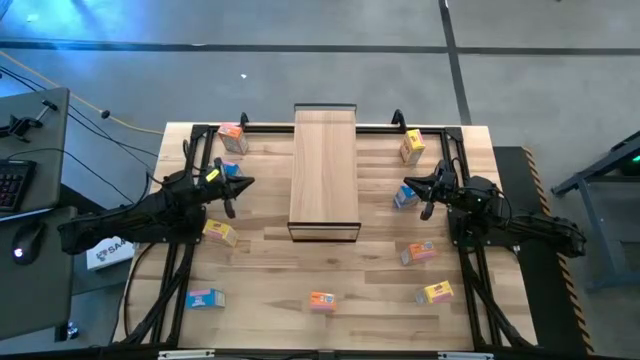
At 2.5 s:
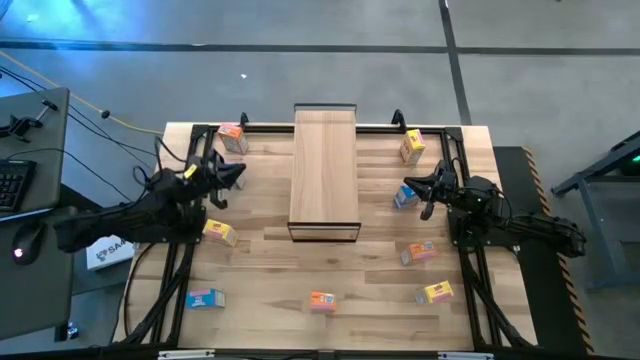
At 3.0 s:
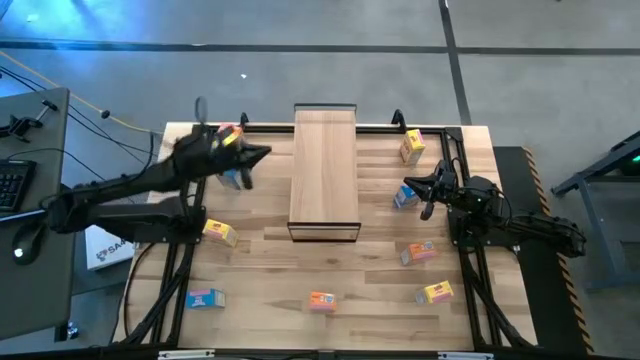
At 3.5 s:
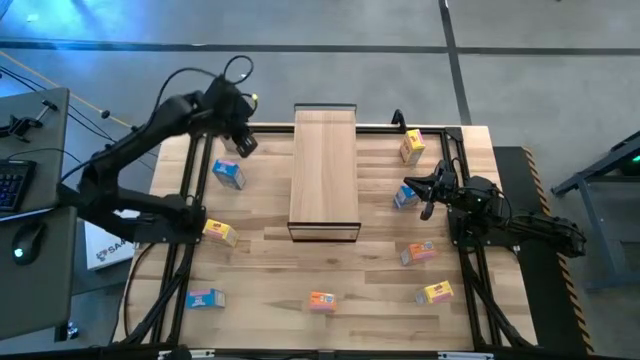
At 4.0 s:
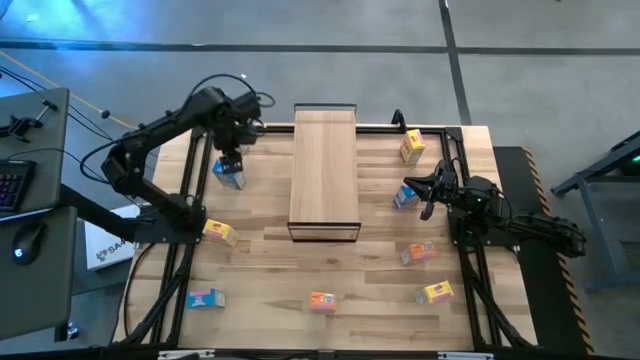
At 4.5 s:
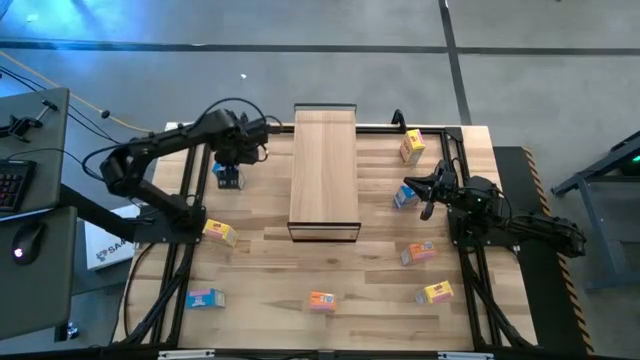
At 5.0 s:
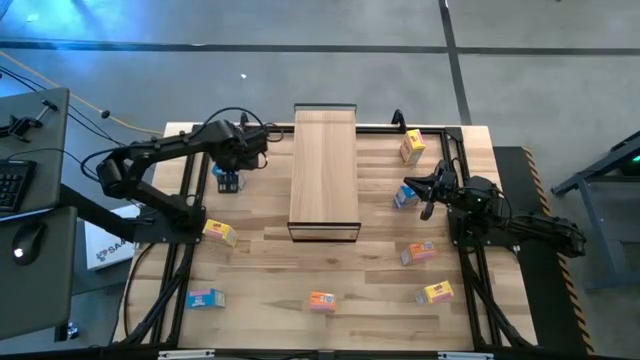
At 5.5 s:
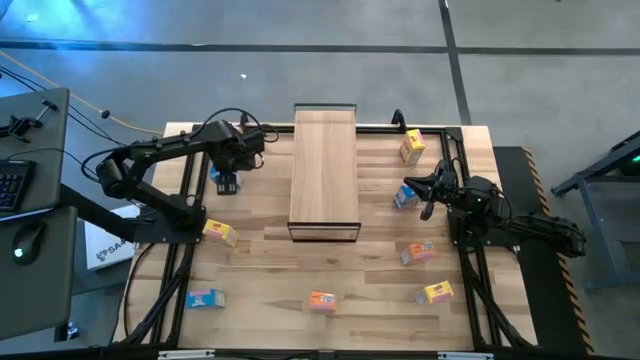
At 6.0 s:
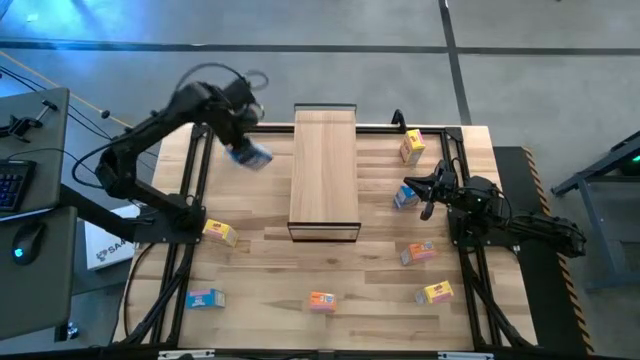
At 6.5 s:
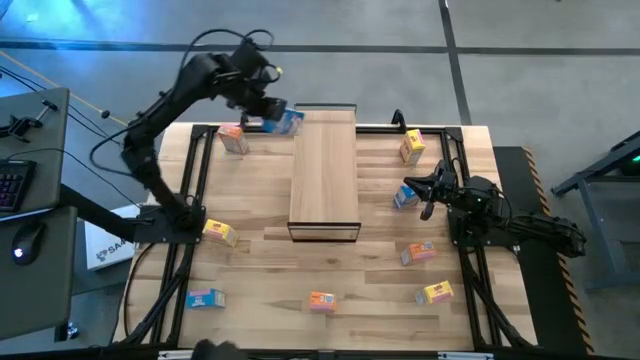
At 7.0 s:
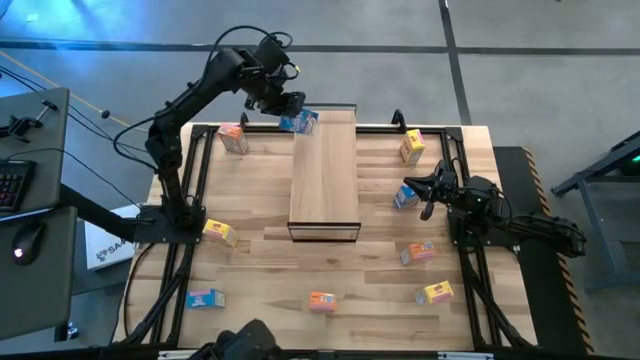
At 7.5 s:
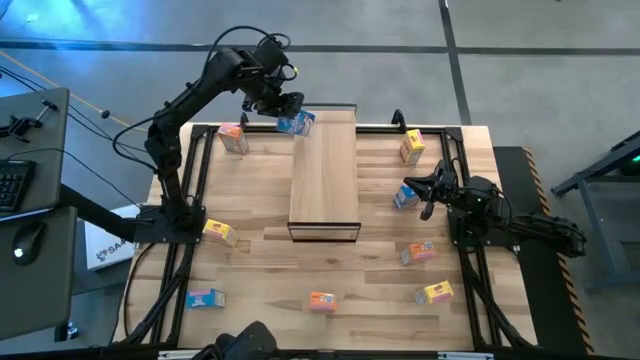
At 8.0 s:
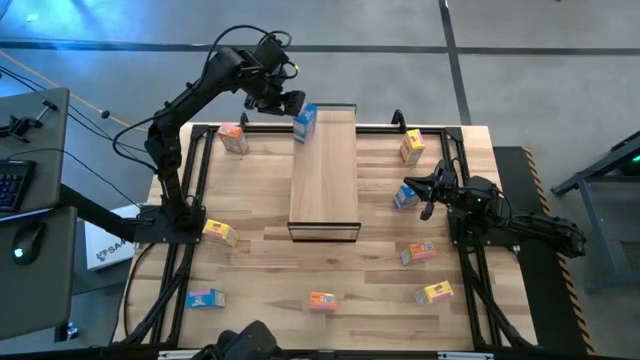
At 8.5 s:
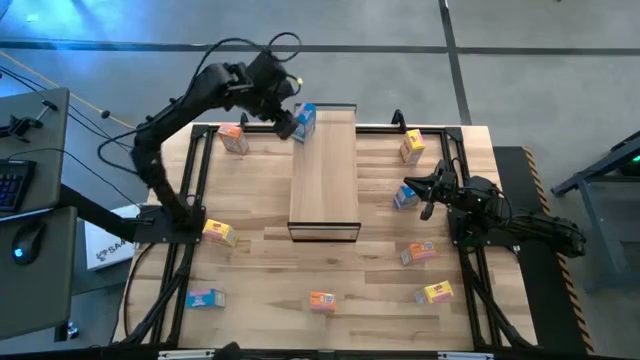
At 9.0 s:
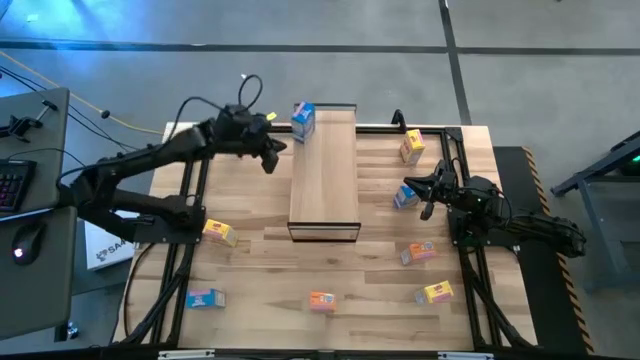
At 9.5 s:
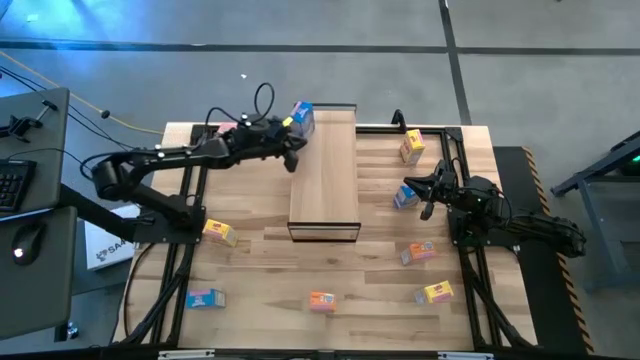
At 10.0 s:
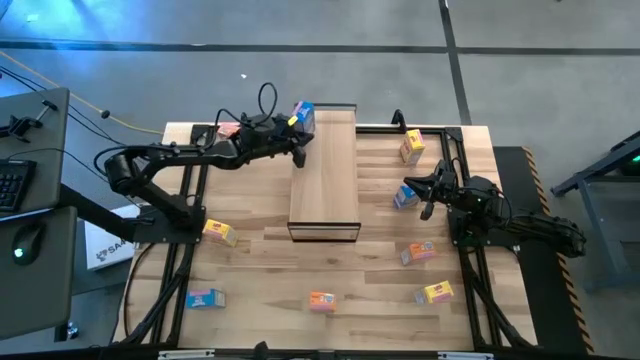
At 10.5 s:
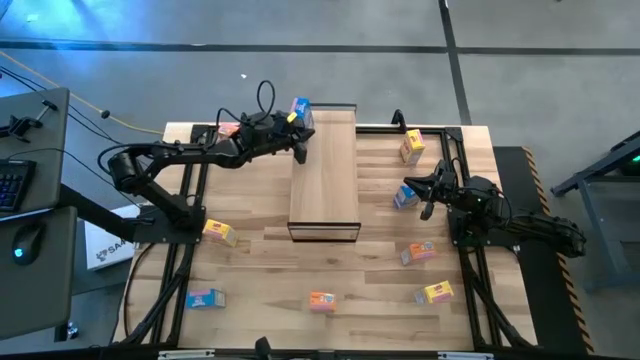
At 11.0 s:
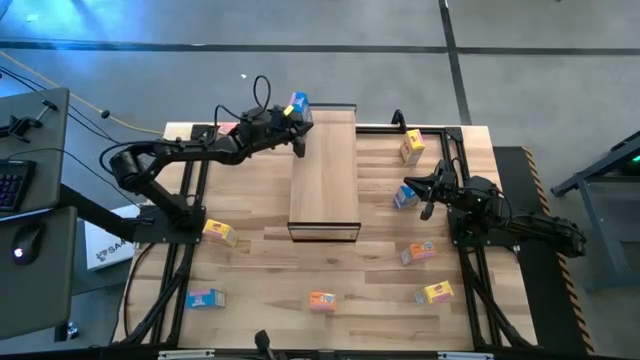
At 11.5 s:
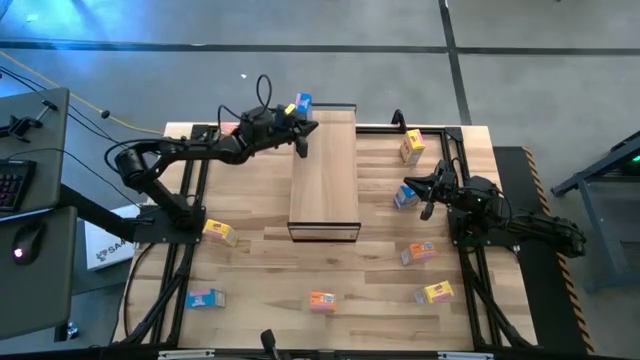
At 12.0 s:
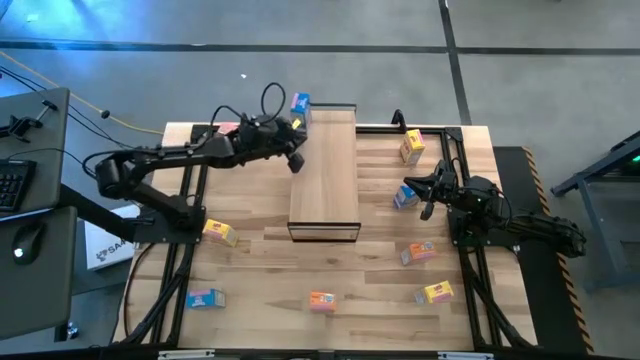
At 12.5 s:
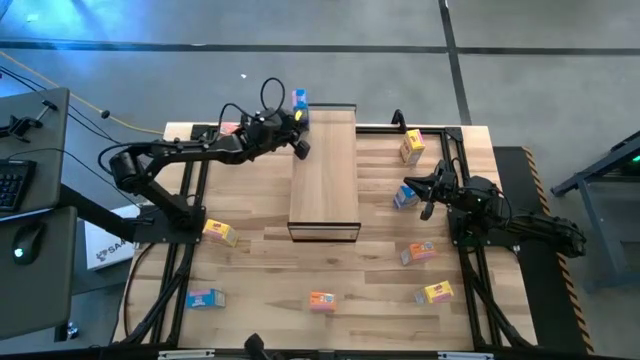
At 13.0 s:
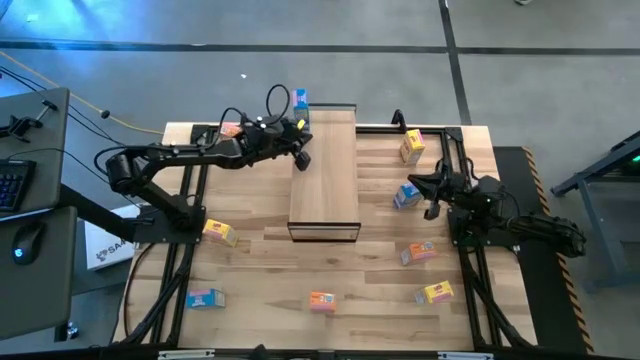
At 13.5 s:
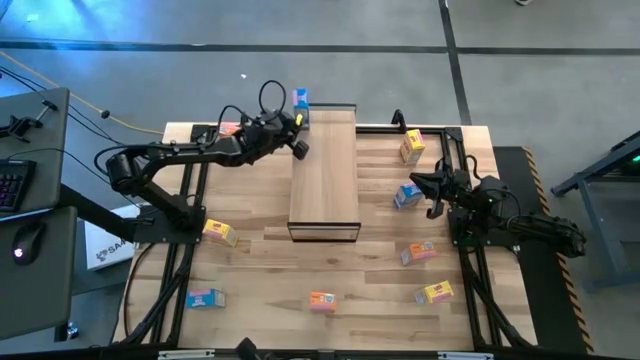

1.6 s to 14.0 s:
Task: Stack cereal on shelf
Put the top left blue cereal box on the shelf

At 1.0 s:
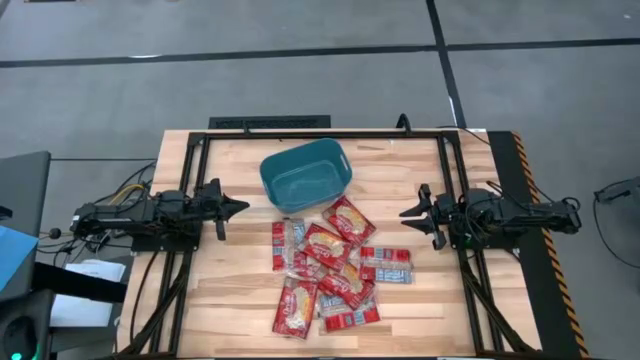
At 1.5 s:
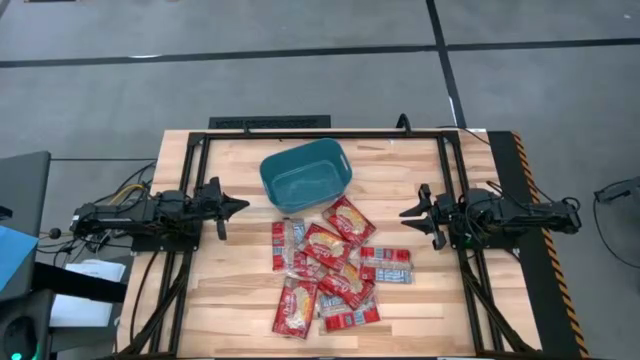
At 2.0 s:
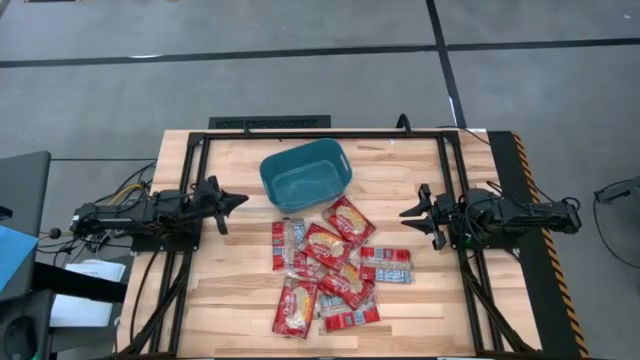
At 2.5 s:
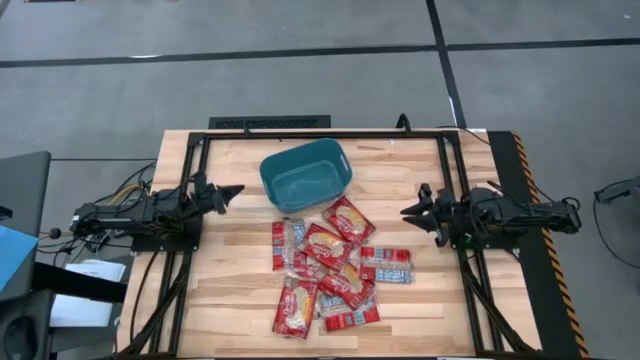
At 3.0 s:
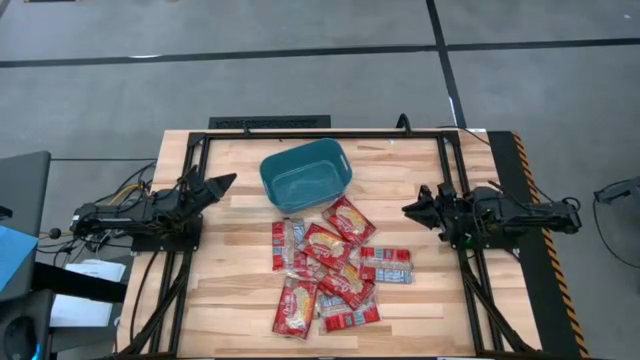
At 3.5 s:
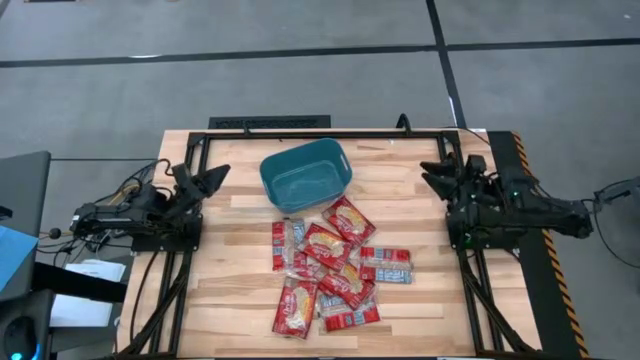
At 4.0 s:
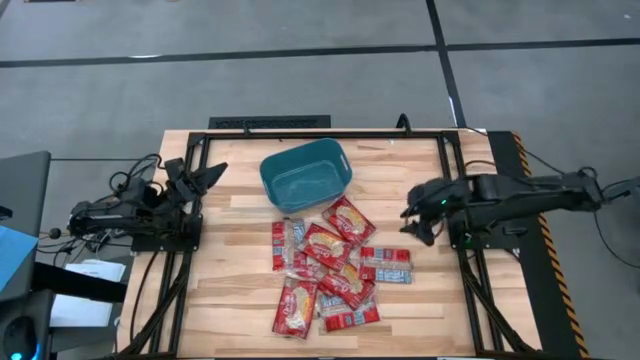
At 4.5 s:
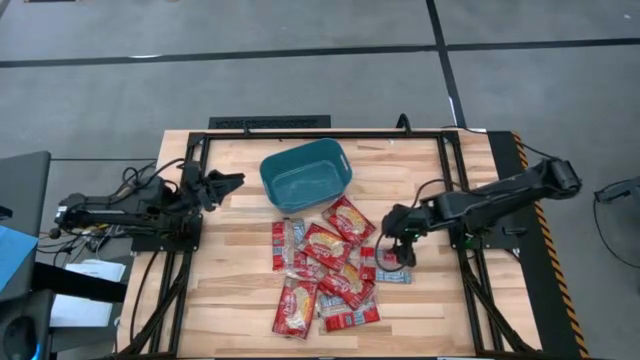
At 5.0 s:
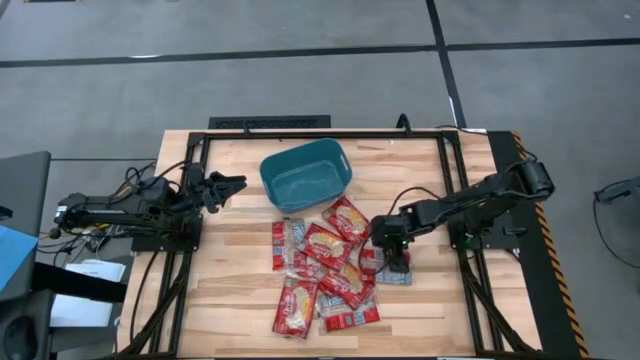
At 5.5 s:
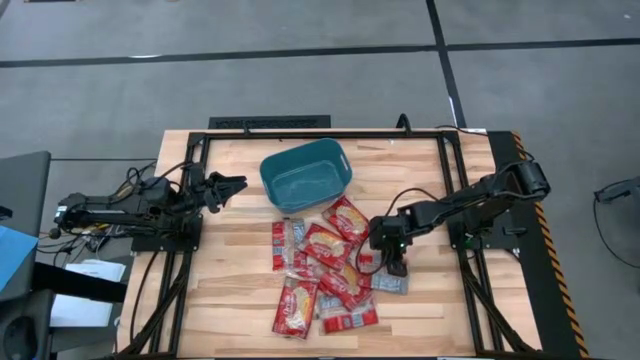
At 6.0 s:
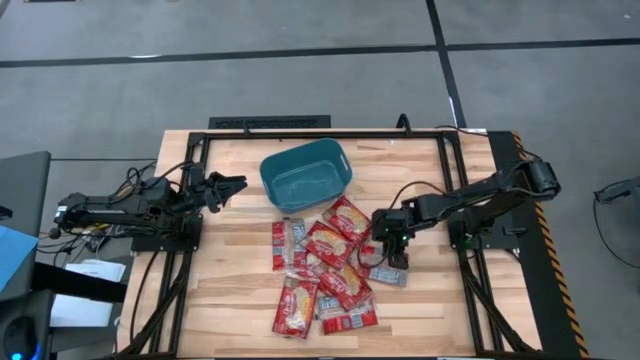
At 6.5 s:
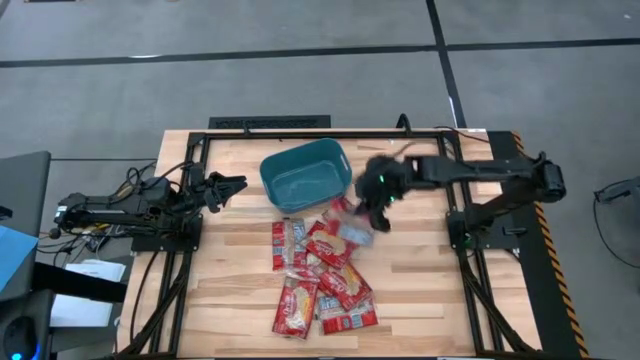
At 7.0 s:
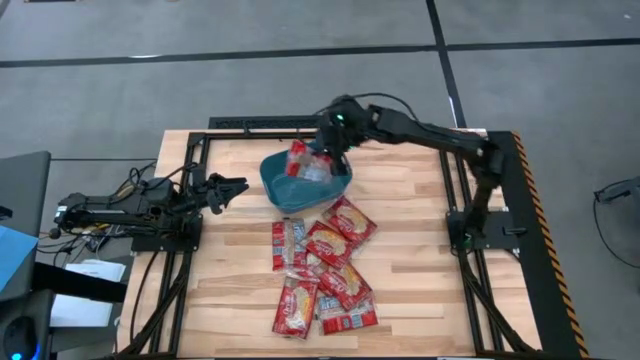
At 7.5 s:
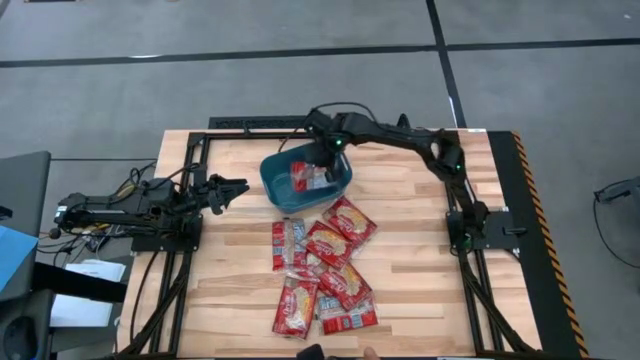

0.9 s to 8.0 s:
Task: Sort popcorn bags into baskets
Put the red popcorn bag into the blue bin
